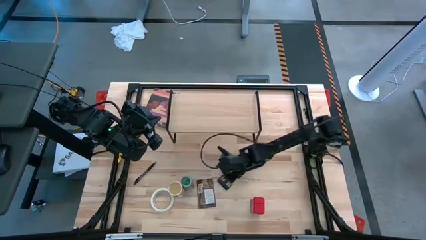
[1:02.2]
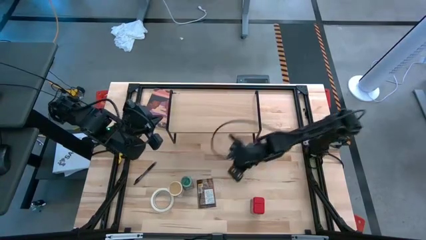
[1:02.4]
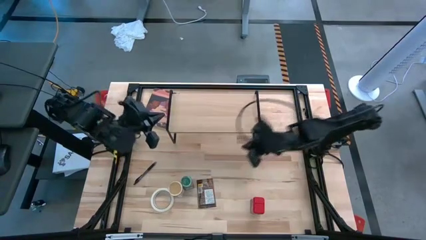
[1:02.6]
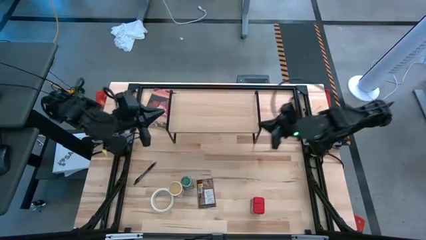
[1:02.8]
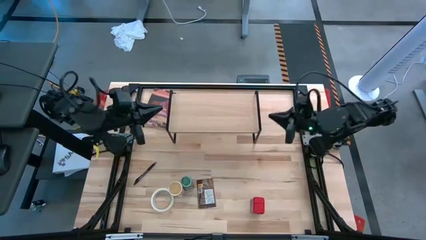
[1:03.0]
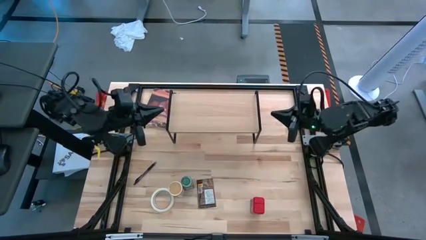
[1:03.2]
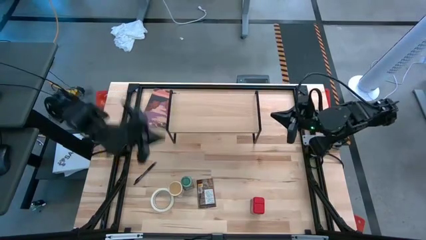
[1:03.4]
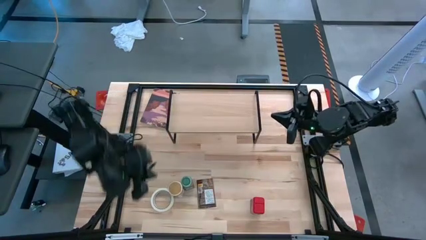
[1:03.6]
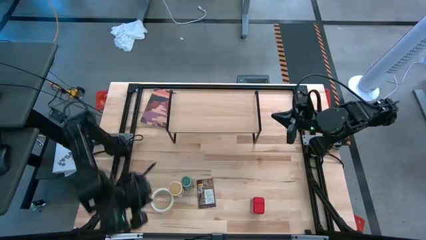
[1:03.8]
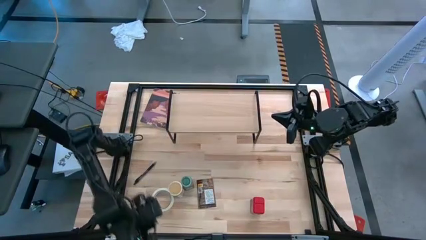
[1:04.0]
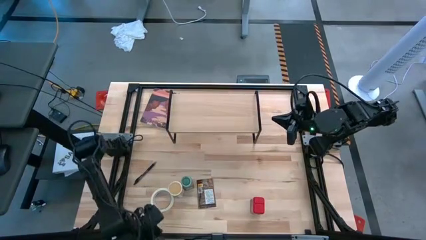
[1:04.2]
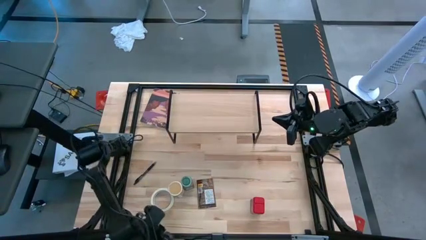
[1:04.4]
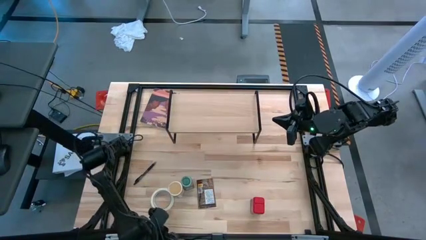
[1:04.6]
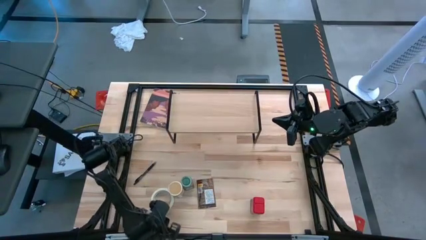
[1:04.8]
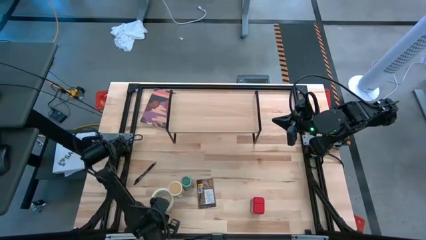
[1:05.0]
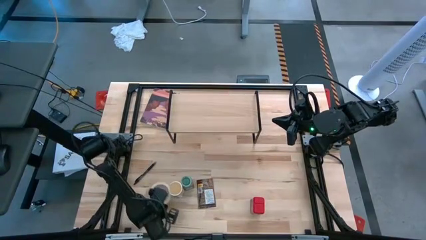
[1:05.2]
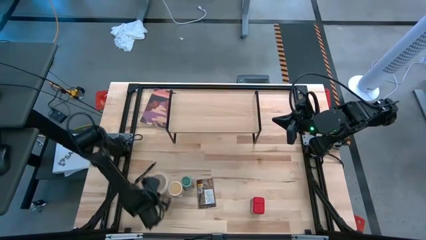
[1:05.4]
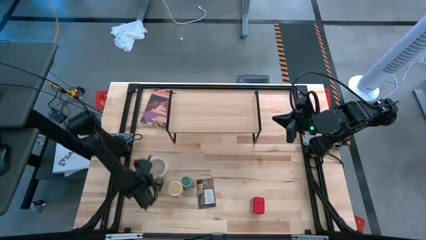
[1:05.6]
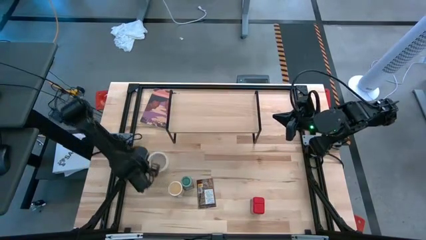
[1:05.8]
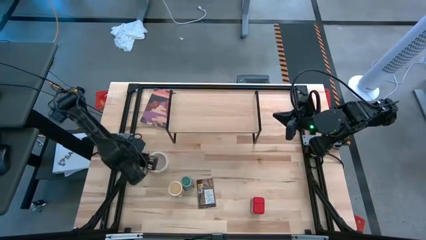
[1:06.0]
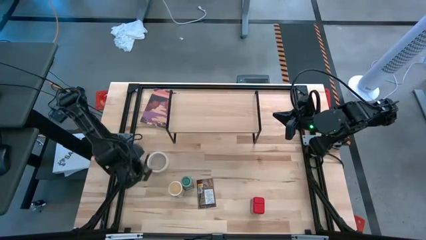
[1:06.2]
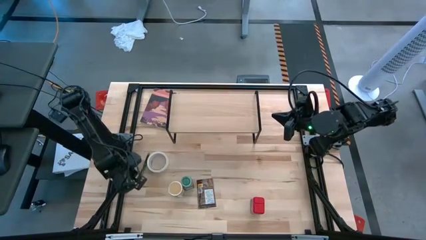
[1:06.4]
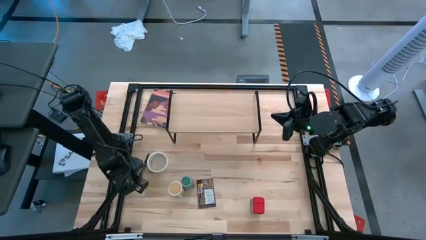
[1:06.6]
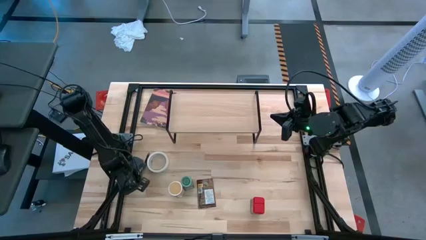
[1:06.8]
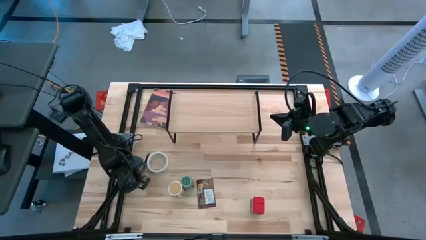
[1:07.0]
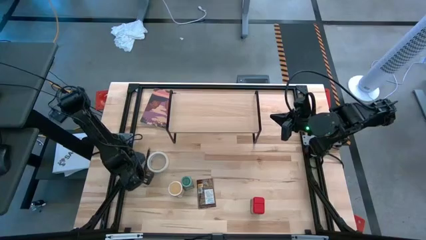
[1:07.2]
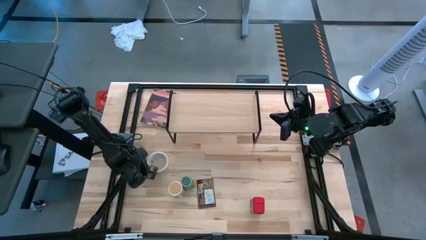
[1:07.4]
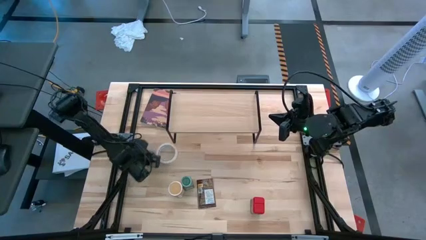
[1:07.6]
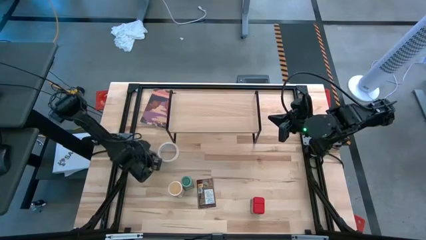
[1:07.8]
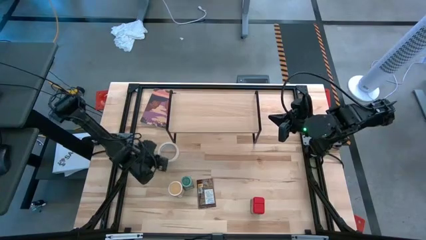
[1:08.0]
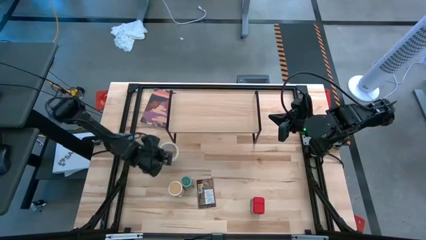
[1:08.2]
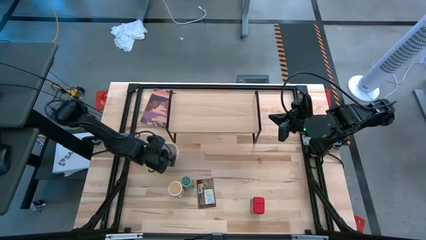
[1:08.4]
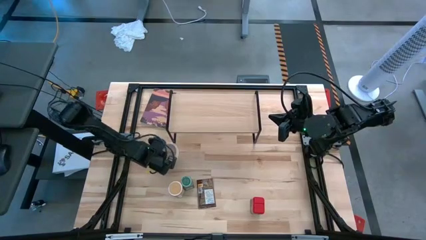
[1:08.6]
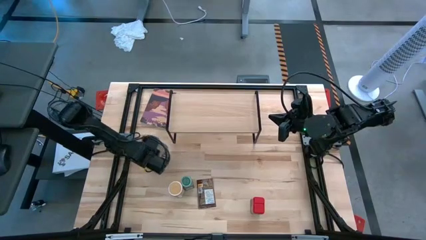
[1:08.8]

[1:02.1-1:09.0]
Task: Shelf spices
Adjust the tape and ballpen

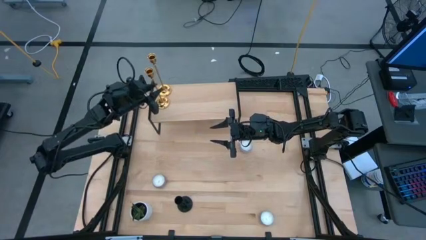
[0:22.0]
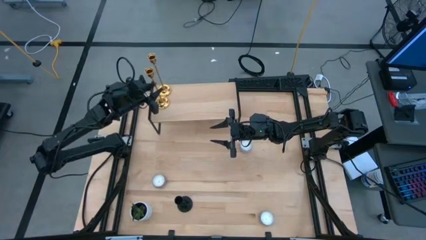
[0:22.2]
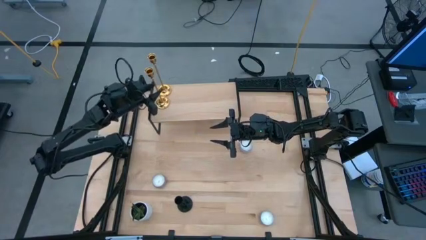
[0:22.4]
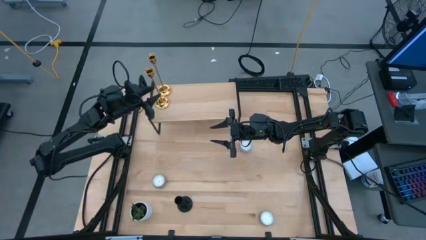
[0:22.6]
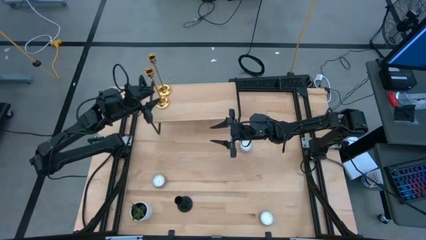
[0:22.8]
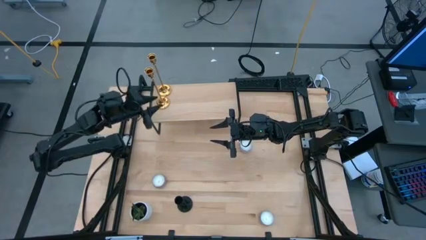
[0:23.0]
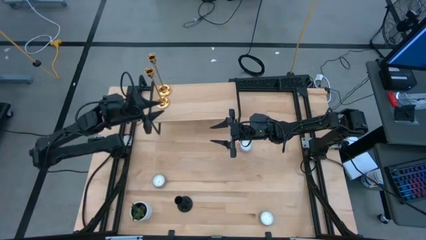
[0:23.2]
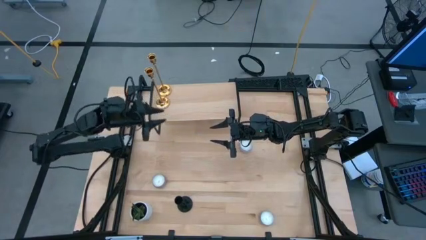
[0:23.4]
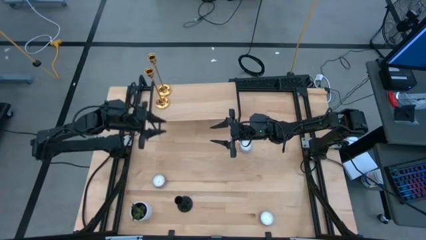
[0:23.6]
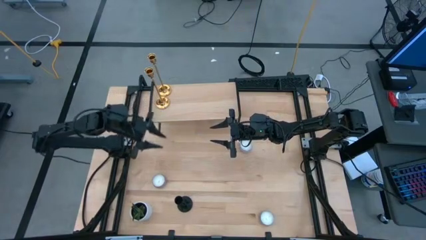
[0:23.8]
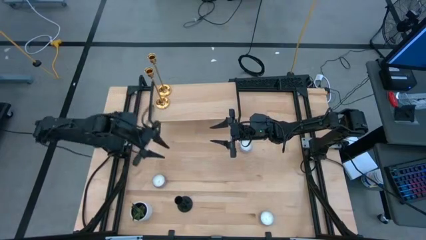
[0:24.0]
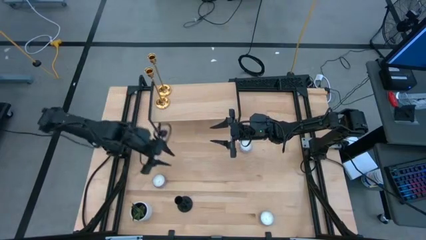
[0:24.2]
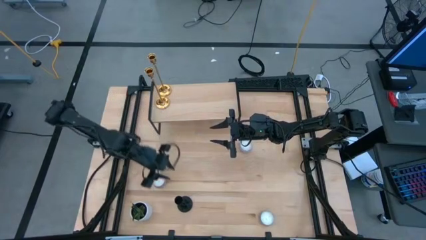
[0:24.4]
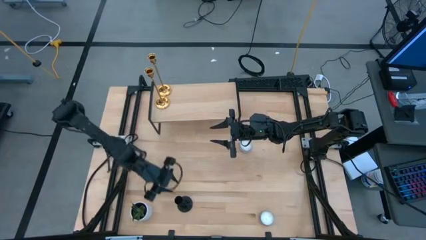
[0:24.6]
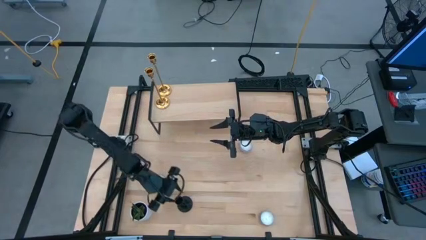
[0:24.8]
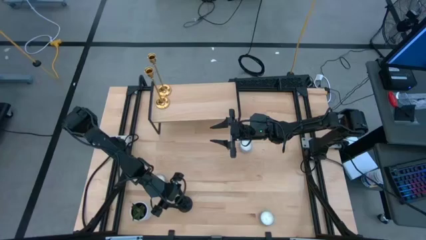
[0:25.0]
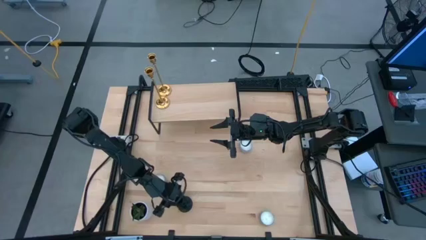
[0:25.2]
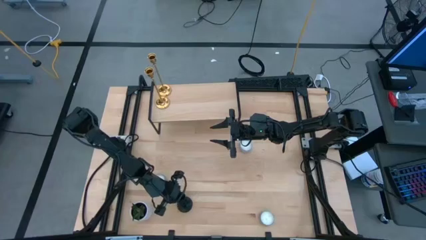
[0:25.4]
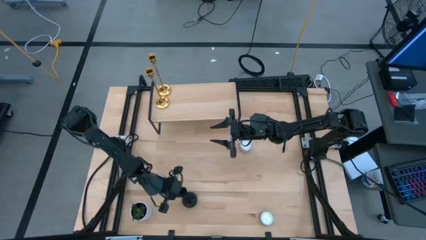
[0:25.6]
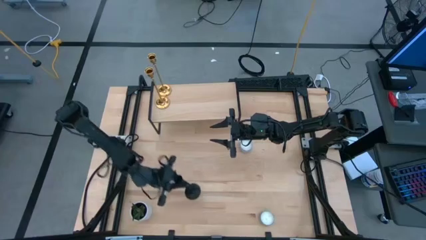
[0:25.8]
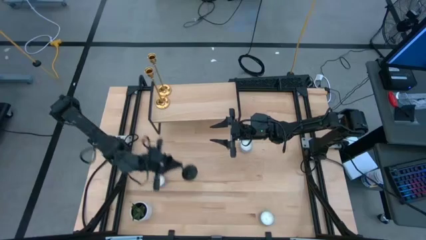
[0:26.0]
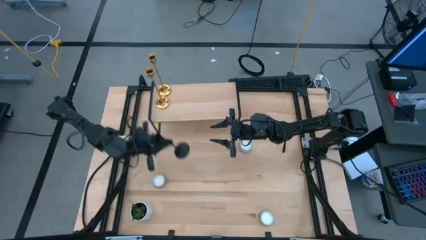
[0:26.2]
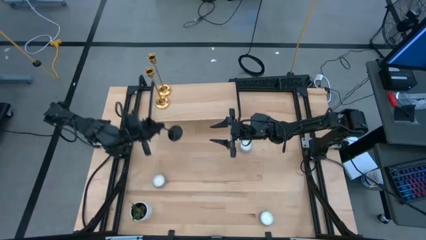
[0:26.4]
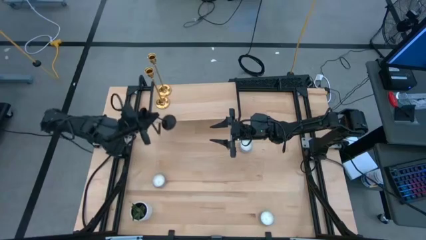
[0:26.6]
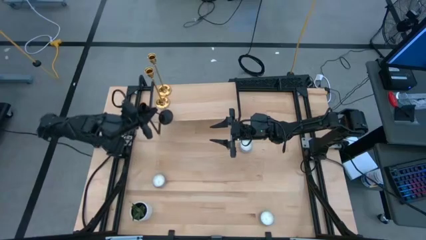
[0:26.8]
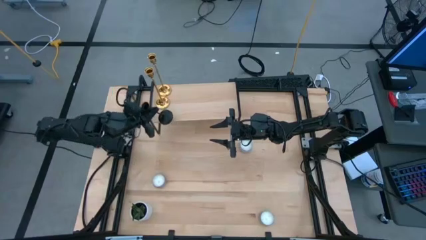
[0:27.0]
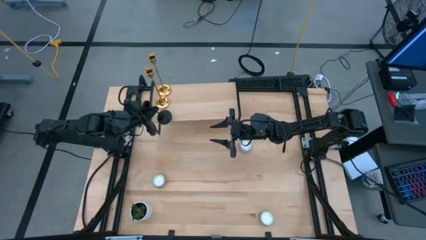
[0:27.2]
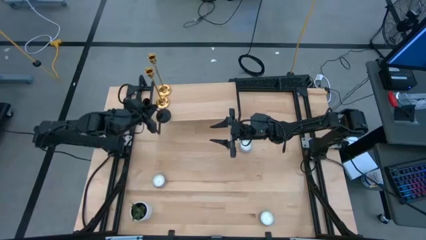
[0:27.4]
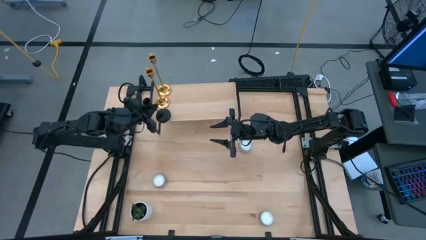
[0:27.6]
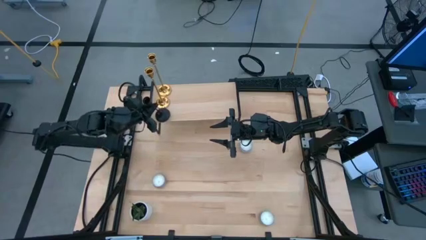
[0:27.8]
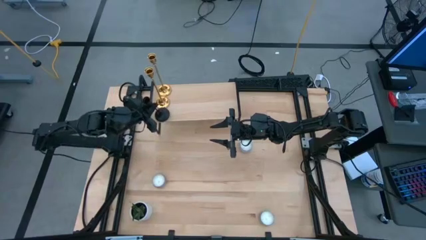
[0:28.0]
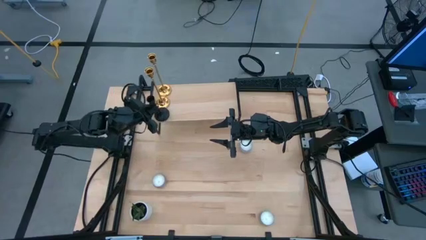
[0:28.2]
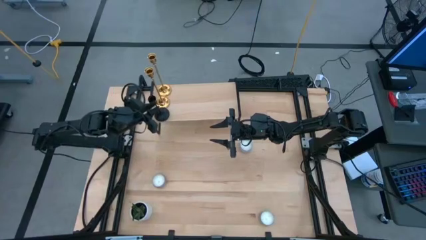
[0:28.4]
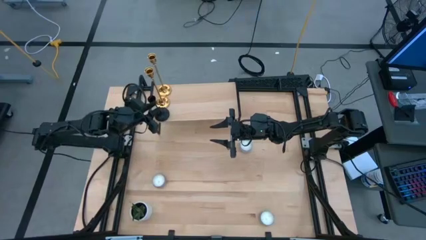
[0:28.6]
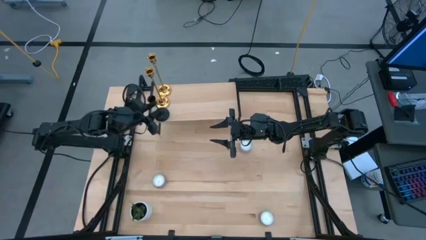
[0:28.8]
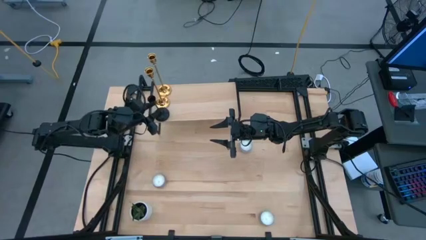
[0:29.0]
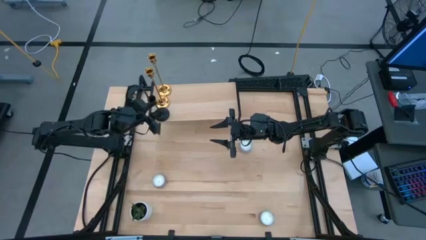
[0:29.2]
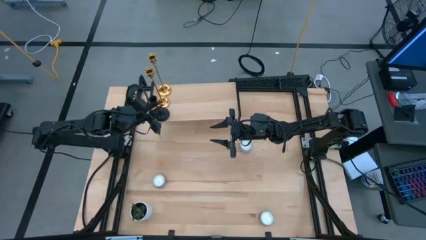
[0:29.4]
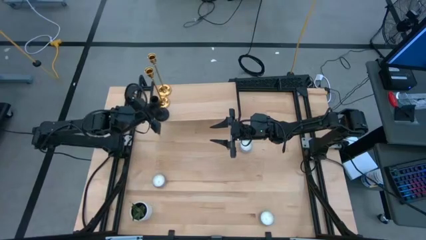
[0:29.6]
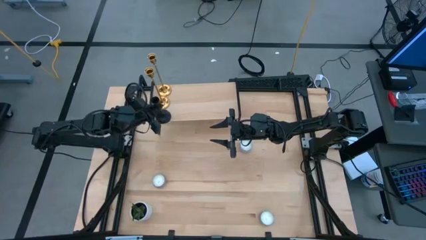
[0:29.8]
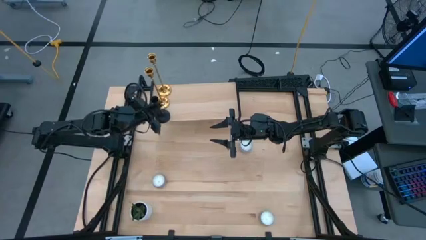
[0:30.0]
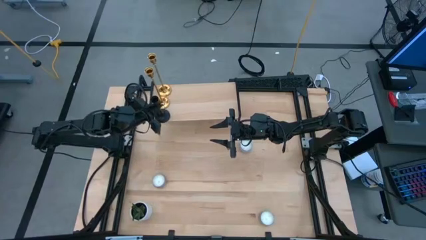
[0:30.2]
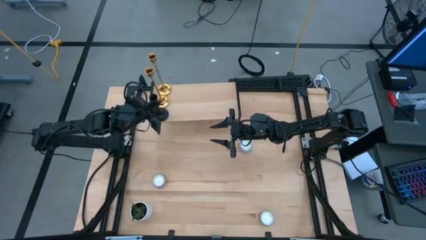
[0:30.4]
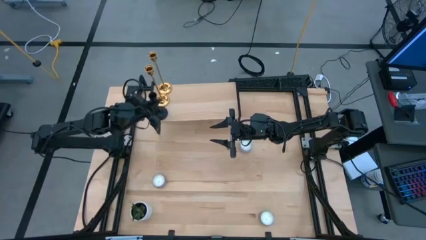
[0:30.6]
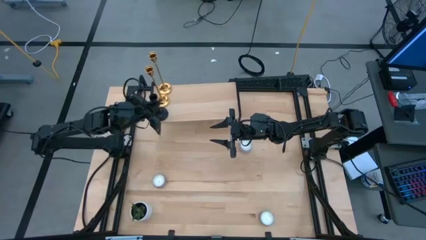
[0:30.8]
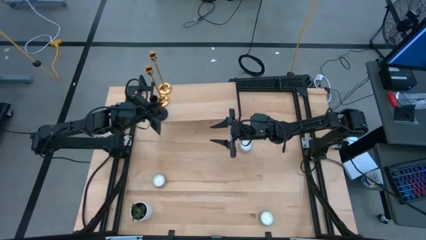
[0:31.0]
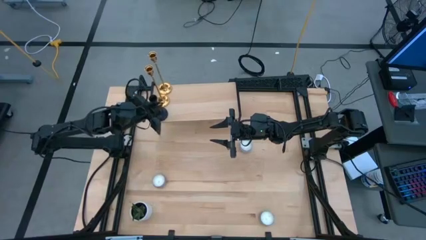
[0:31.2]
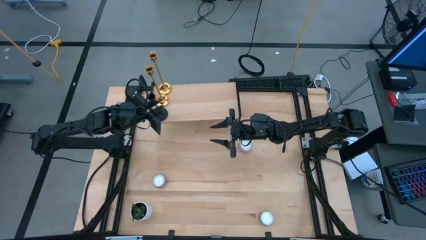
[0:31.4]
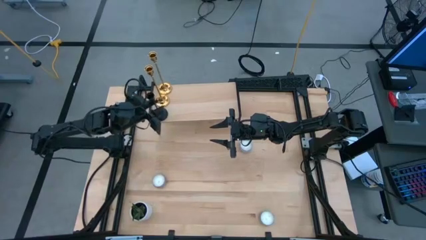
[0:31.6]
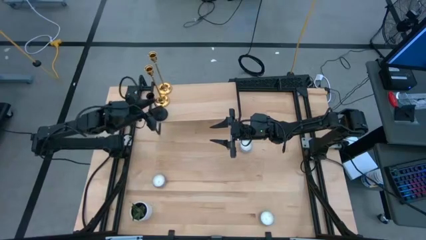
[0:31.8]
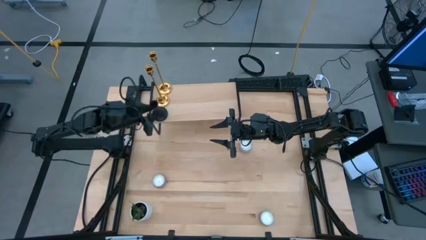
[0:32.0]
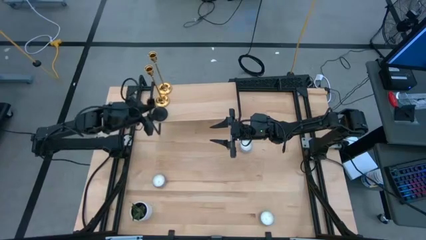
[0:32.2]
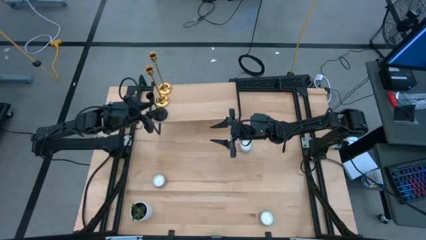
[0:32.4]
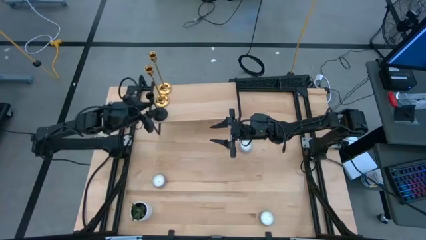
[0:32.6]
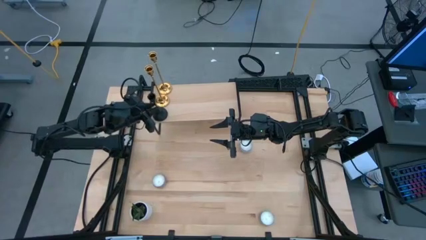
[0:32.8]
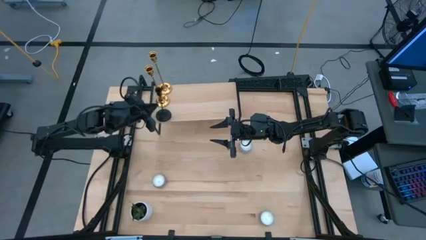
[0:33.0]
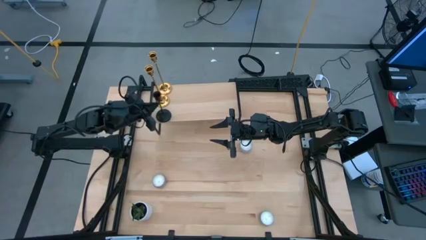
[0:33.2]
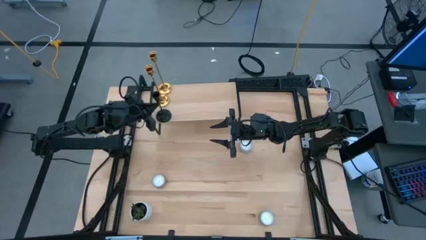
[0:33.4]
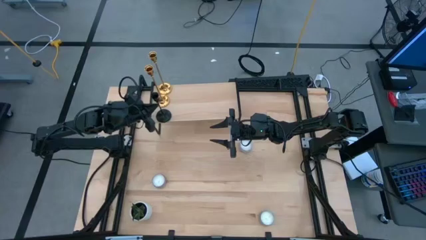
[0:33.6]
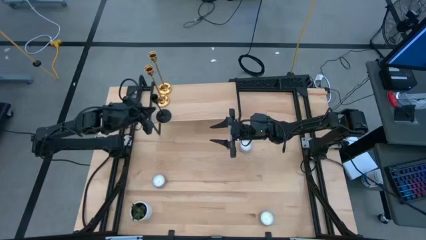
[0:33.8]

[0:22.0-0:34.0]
Task: Pick & Place candle stick holders
Put the black candle holder on the shelf
